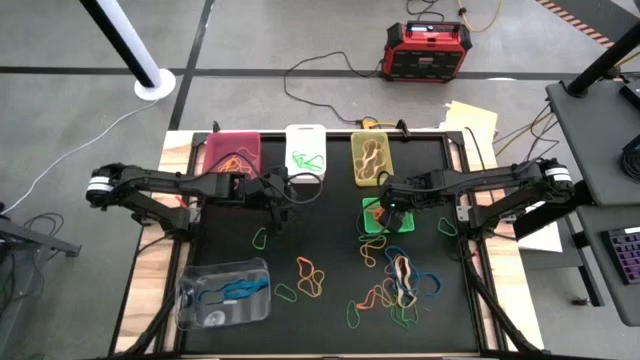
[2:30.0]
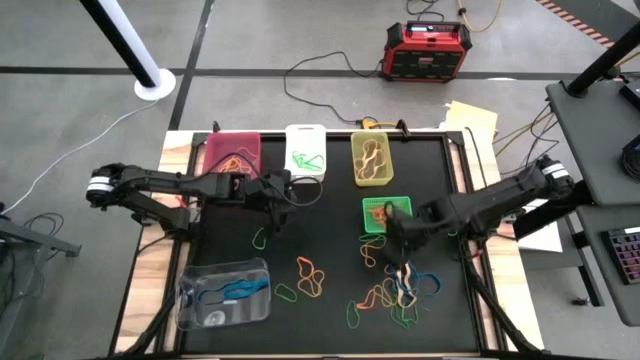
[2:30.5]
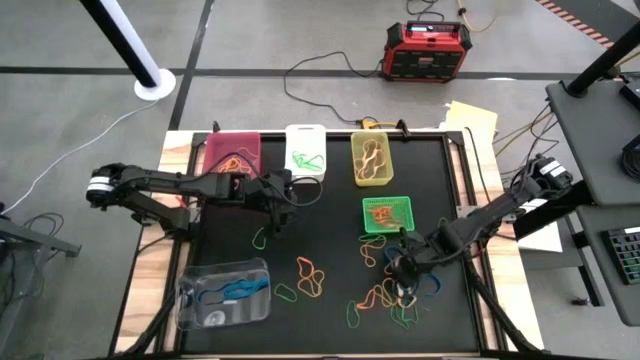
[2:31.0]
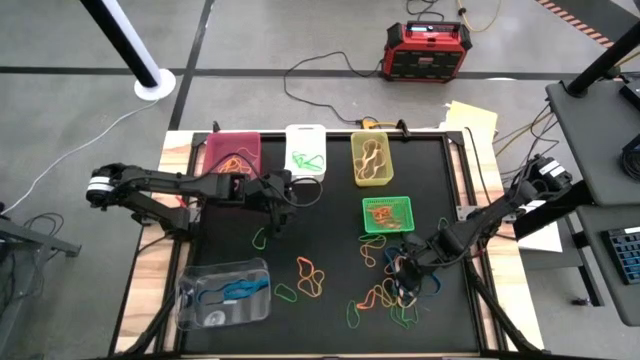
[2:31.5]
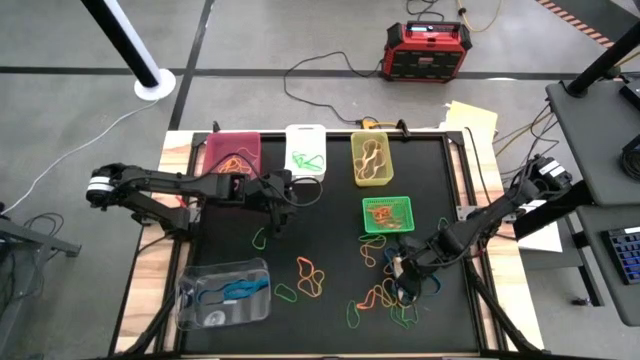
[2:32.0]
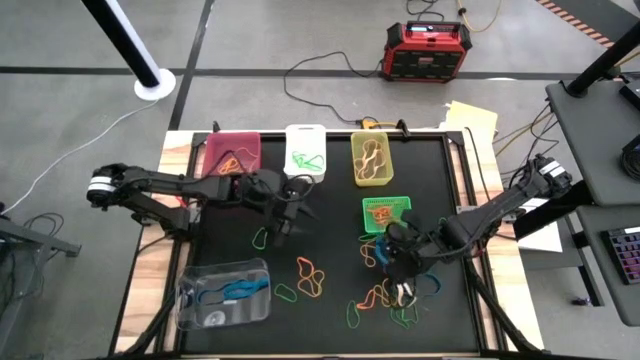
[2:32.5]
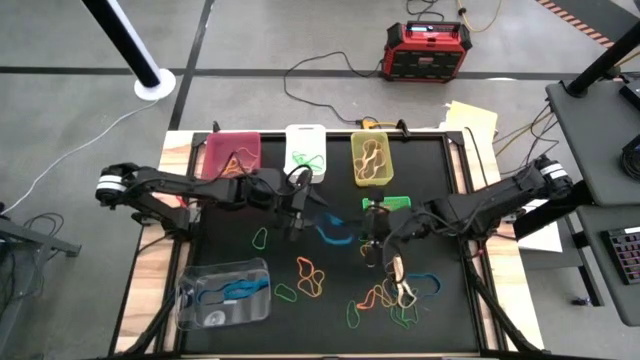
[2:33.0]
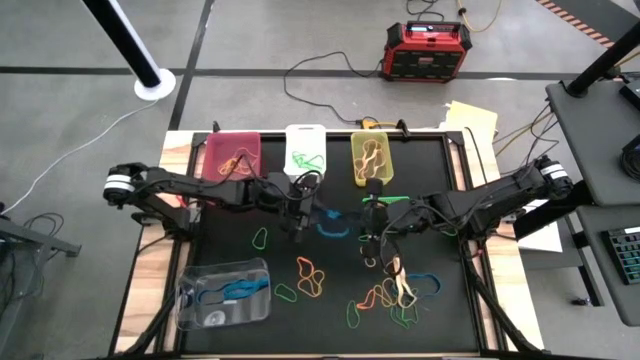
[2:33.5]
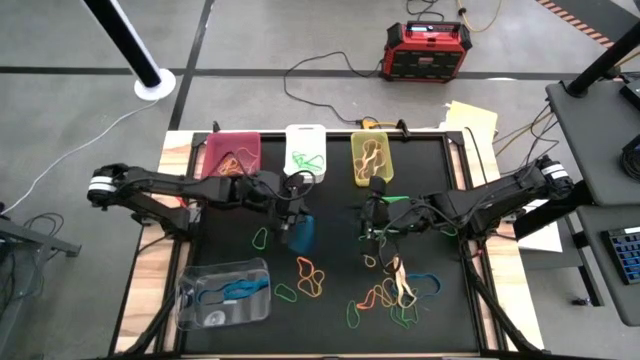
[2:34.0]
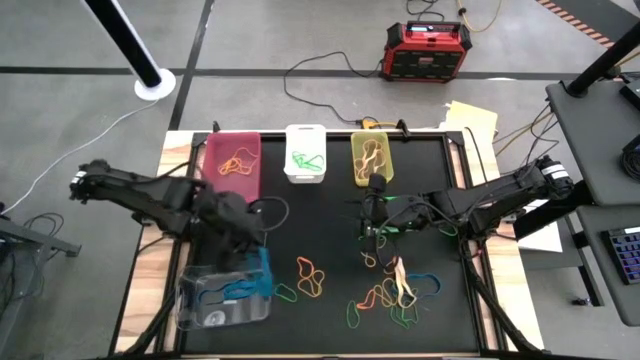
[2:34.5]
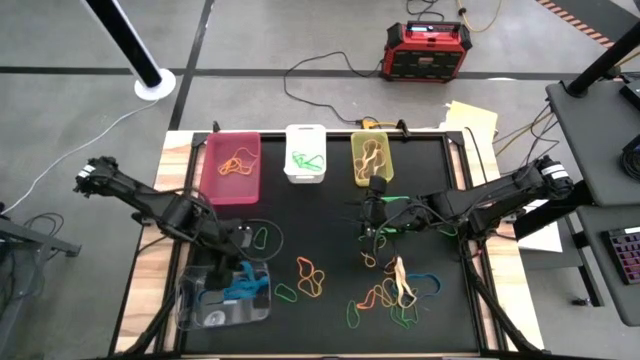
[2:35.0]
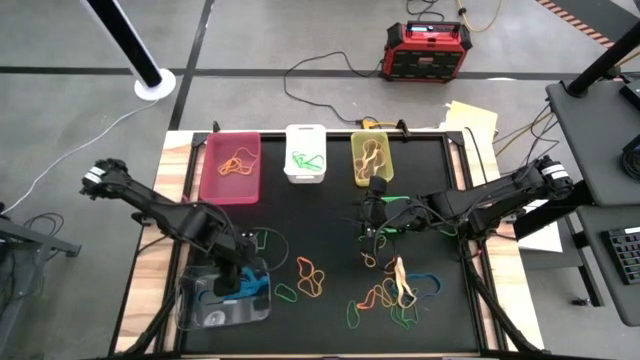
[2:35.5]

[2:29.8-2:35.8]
Task: Sort rubber bands into baskets
Put the blue rubber band into the transparent bin

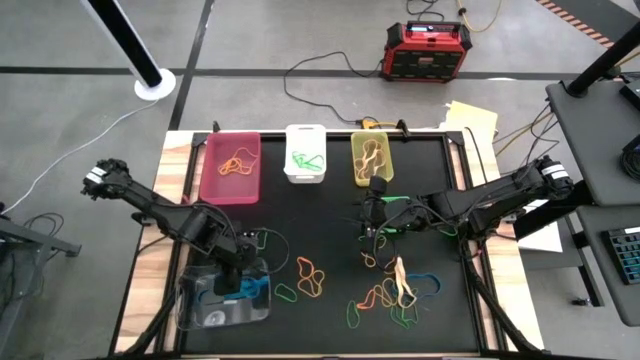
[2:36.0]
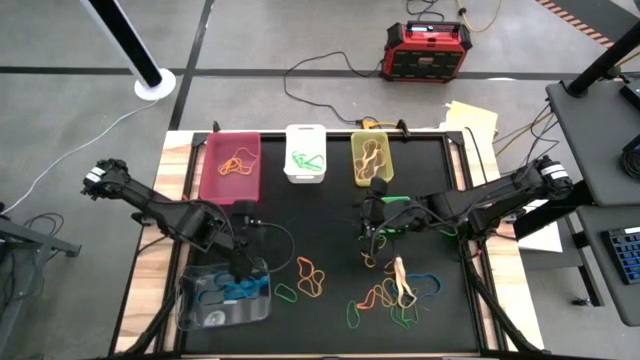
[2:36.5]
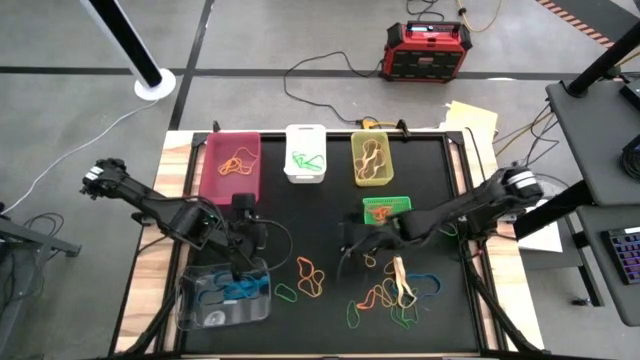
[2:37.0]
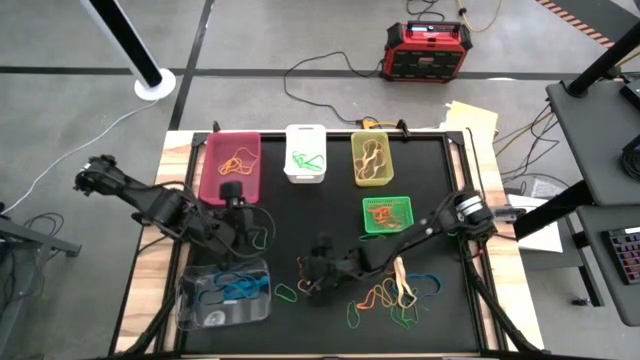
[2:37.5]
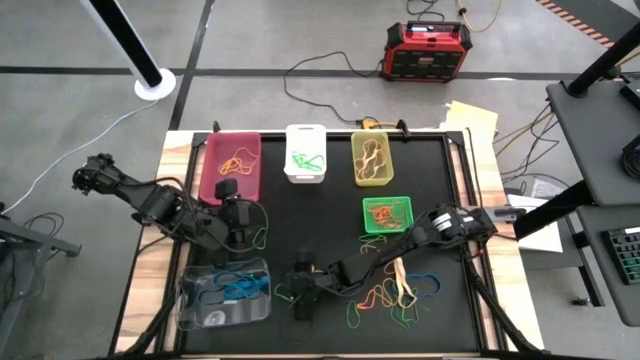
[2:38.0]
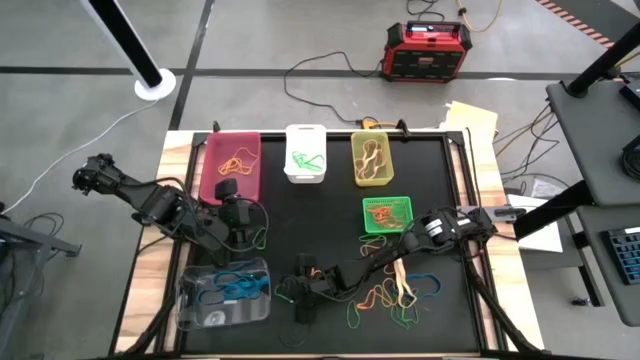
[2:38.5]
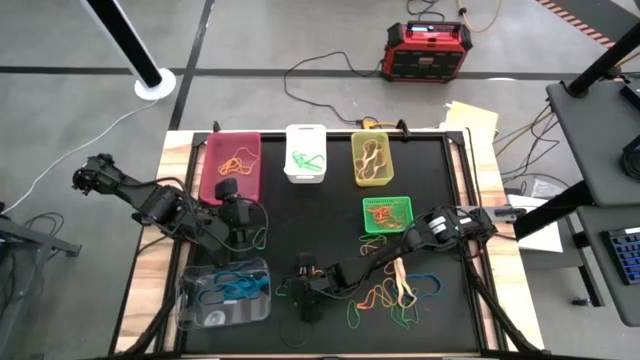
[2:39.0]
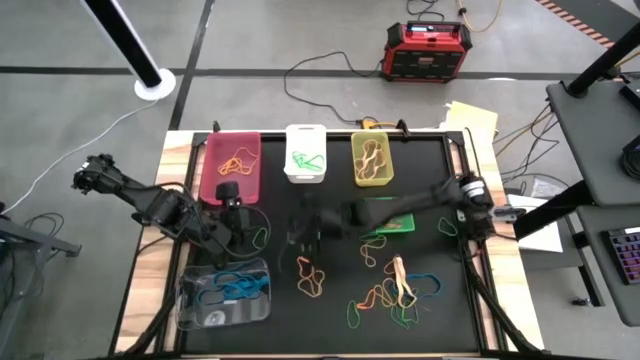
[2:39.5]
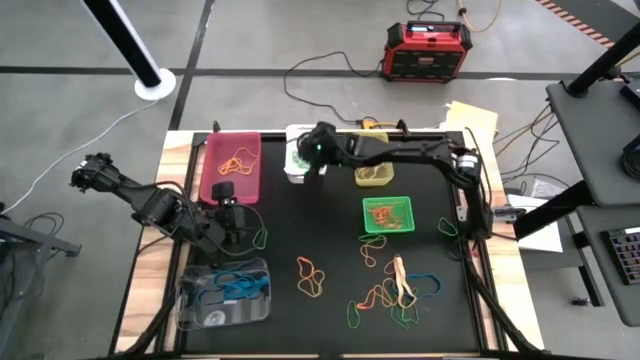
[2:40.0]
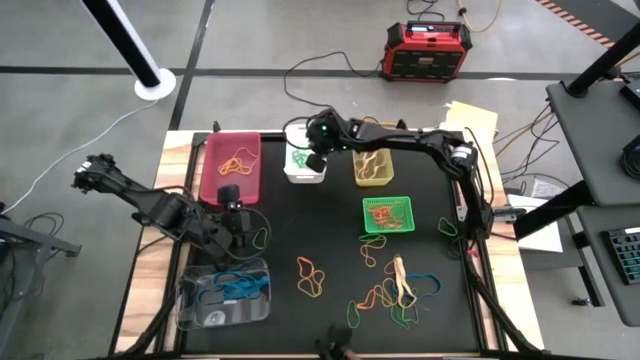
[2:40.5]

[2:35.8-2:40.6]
Put the green rubber band into the white bin

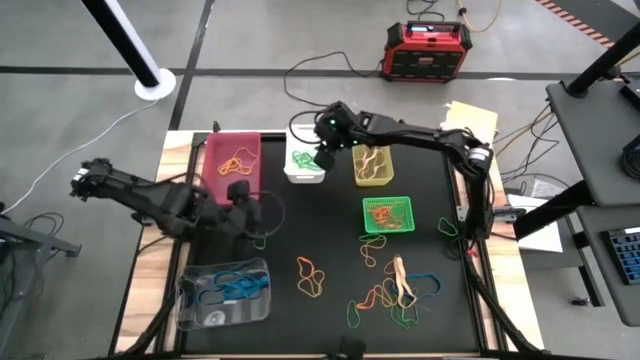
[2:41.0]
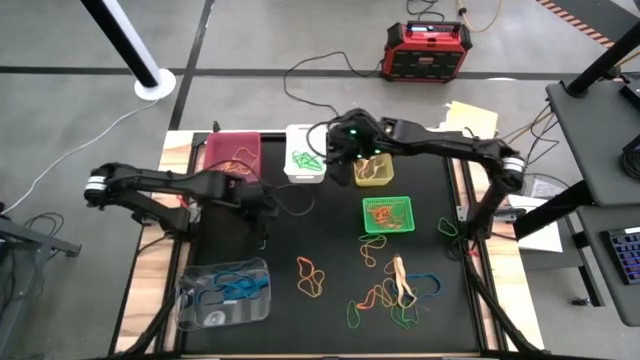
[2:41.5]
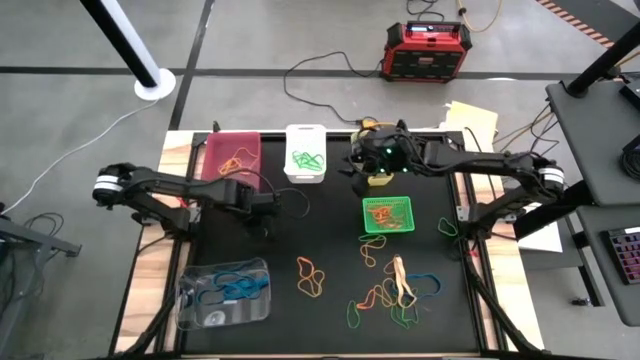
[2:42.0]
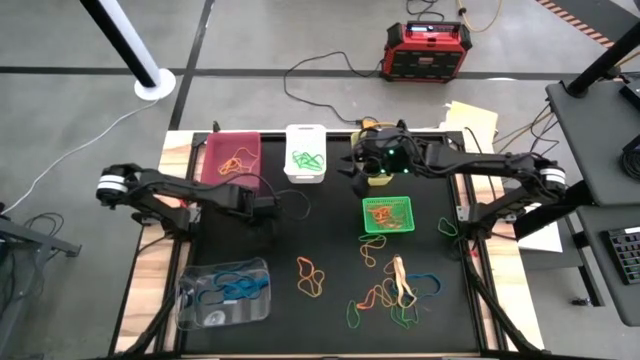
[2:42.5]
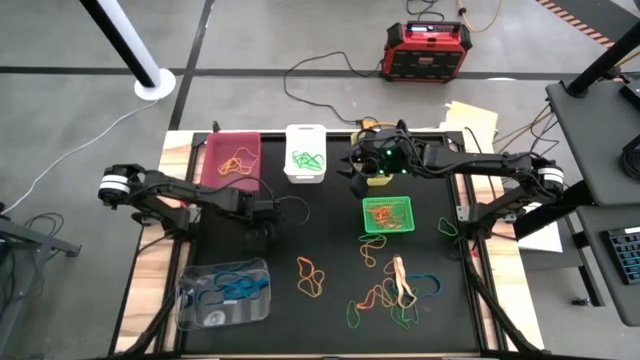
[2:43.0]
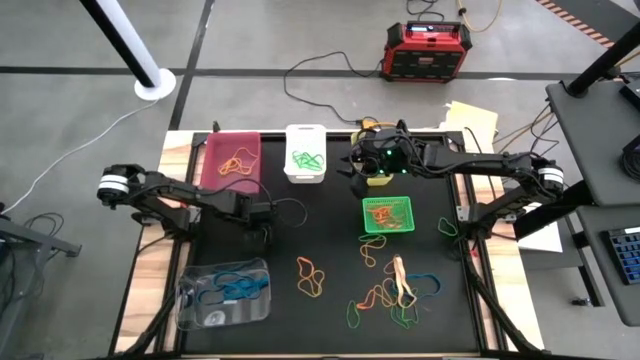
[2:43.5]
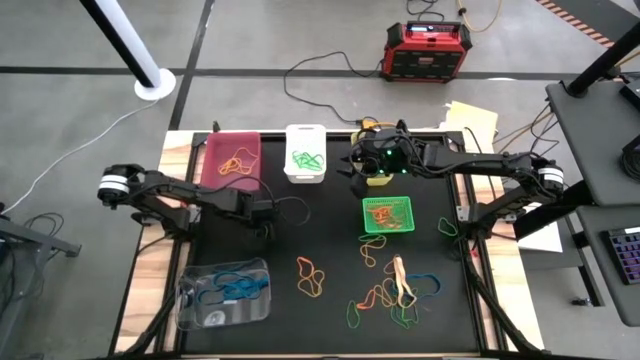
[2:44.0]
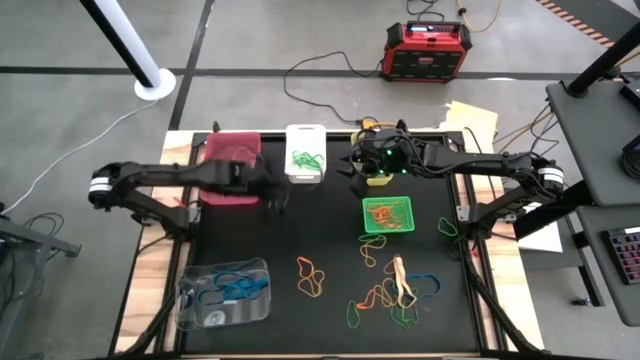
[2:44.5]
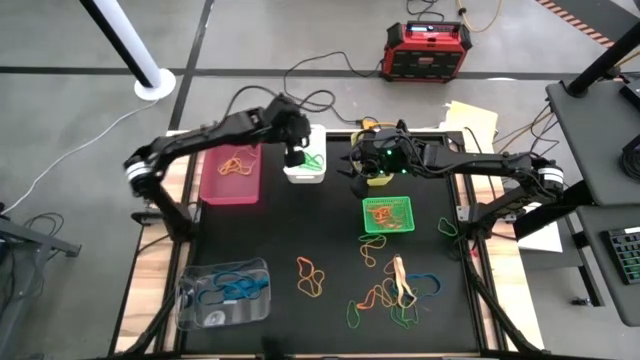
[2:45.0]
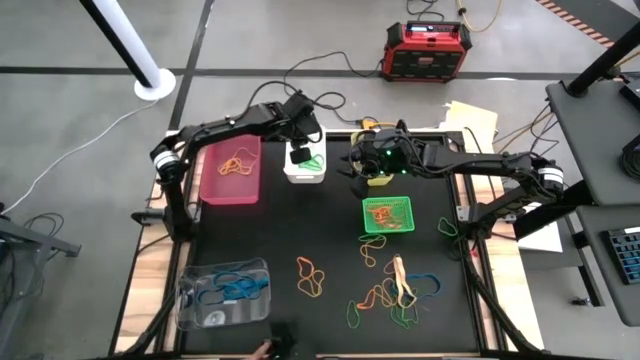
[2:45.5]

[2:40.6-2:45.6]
Put the green rubber band into the white bin

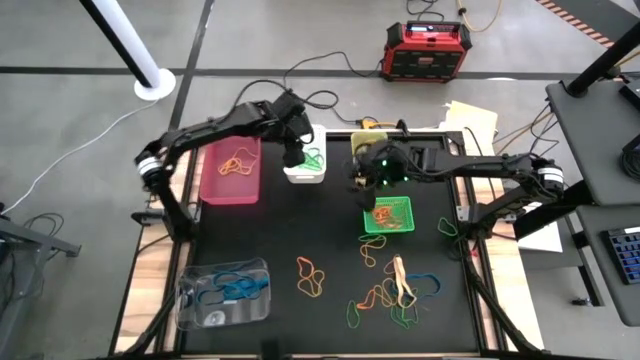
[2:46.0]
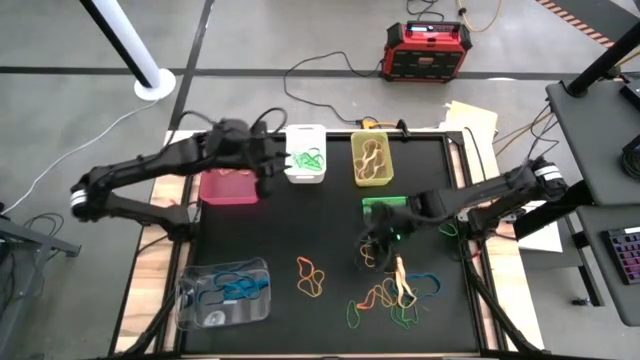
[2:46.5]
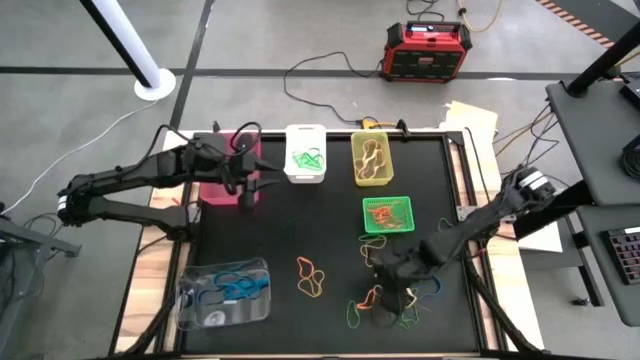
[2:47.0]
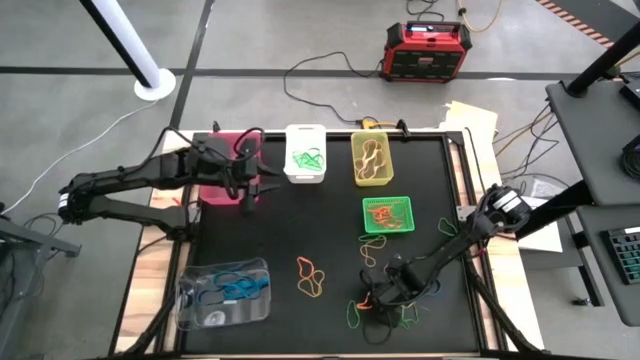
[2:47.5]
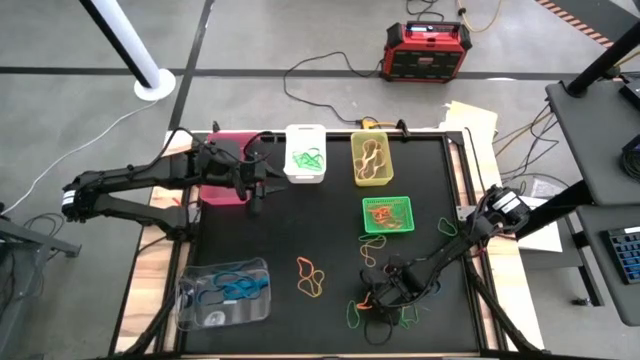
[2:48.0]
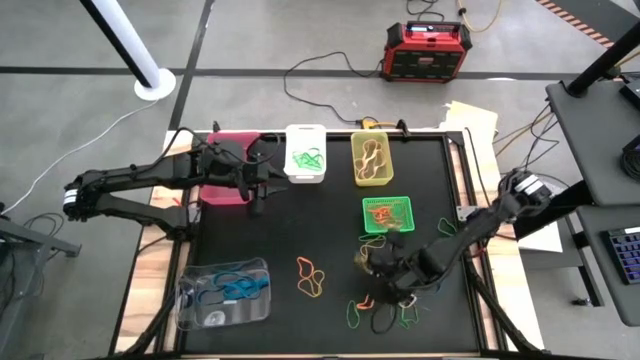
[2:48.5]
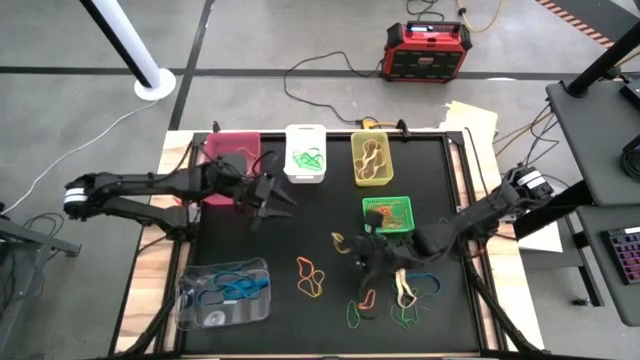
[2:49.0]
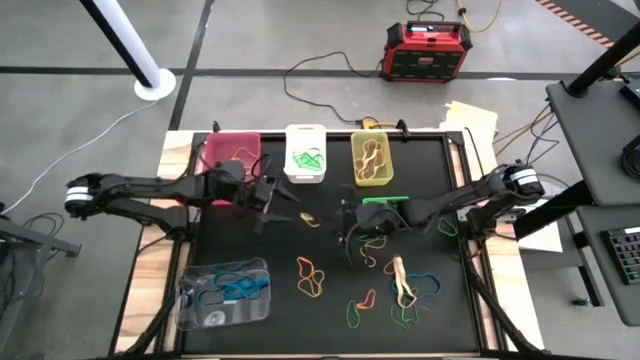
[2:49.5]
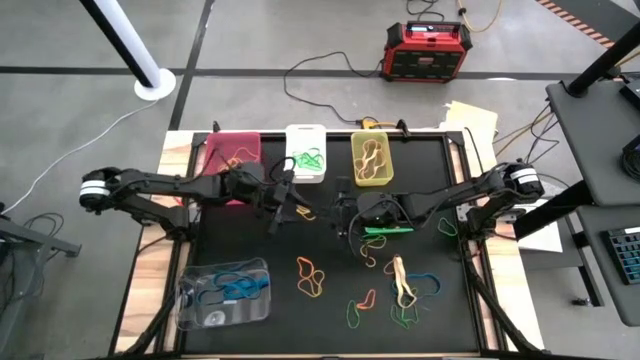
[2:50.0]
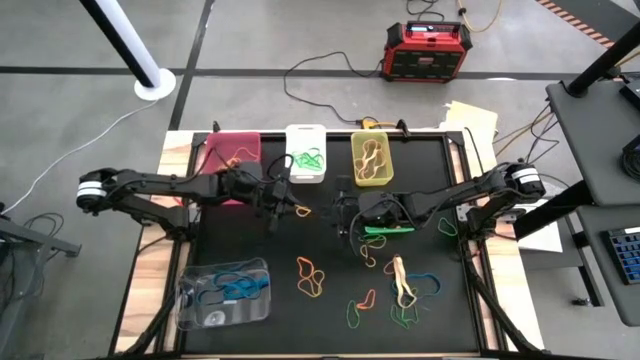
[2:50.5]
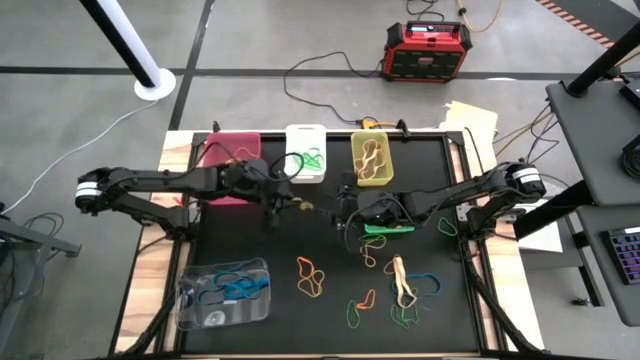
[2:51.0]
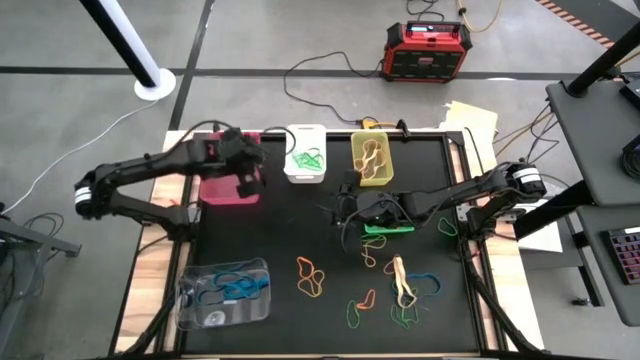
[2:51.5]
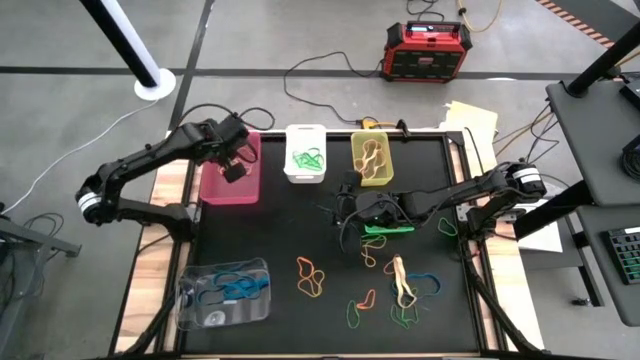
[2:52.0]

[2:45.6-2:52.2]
Put the yellow rubber band into the pink bin
